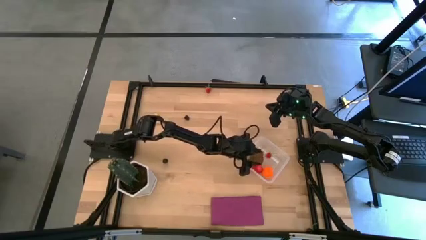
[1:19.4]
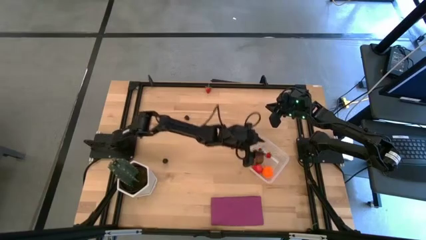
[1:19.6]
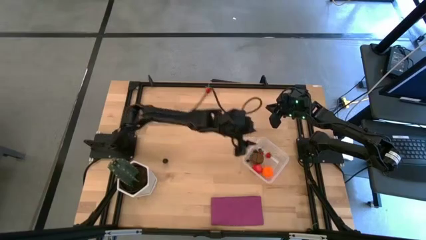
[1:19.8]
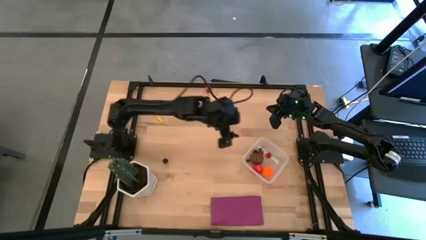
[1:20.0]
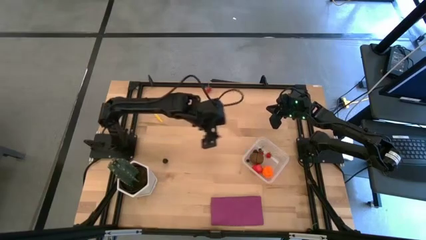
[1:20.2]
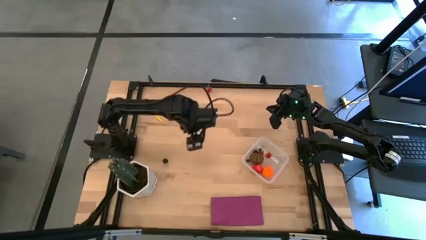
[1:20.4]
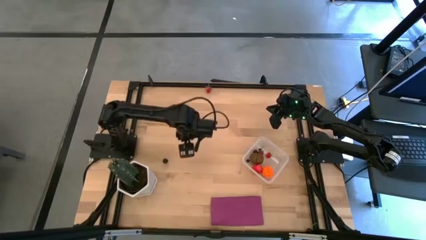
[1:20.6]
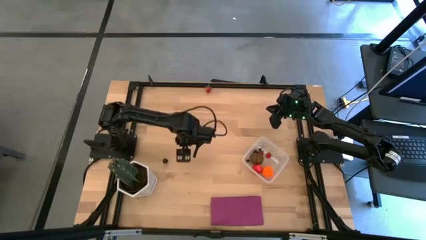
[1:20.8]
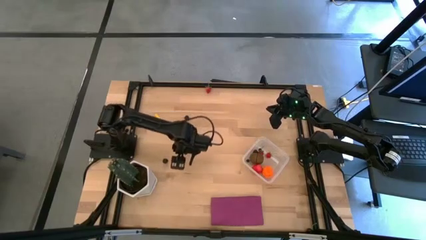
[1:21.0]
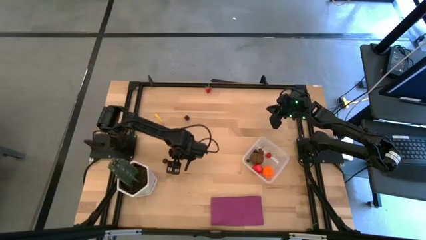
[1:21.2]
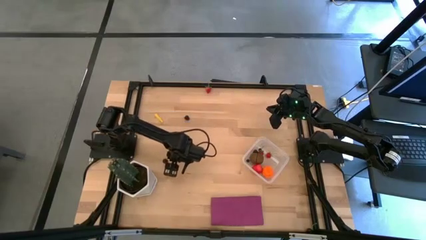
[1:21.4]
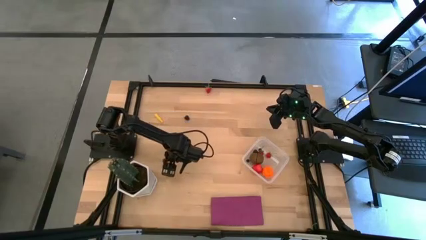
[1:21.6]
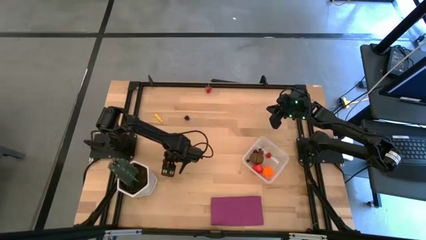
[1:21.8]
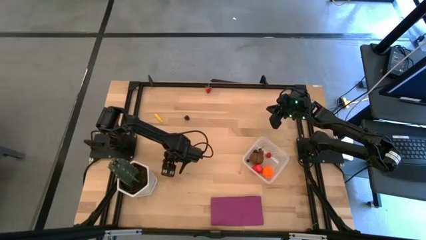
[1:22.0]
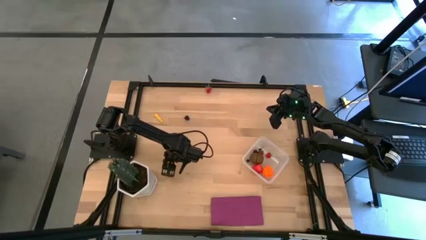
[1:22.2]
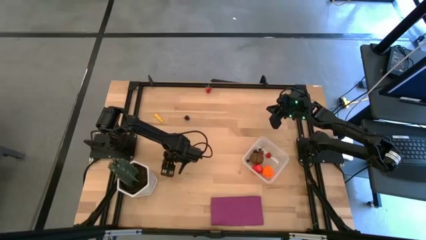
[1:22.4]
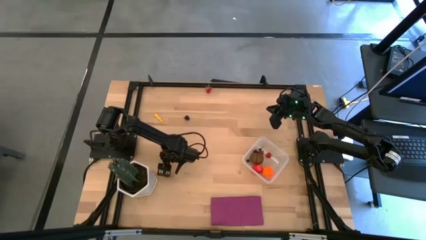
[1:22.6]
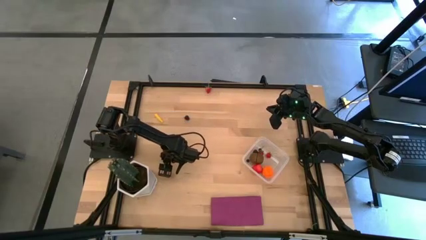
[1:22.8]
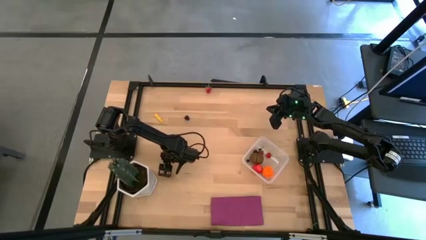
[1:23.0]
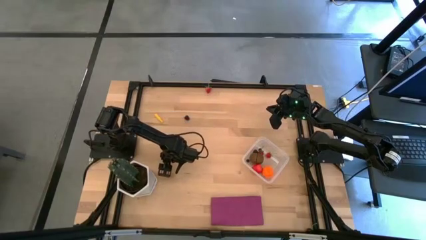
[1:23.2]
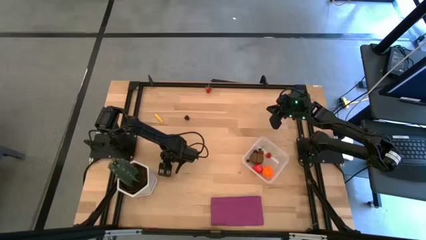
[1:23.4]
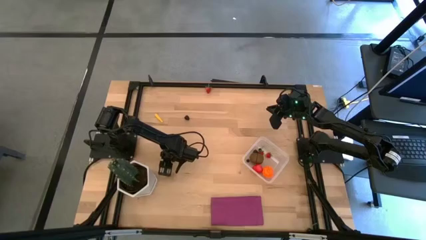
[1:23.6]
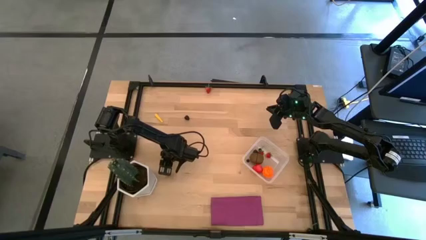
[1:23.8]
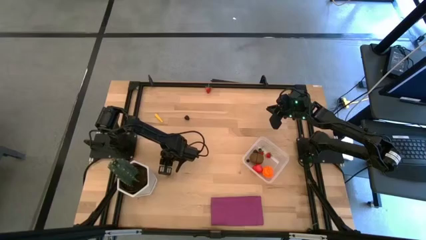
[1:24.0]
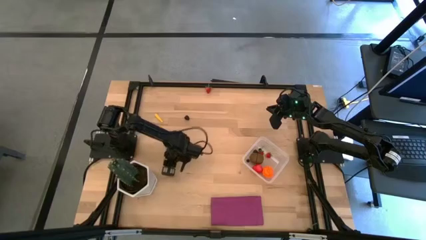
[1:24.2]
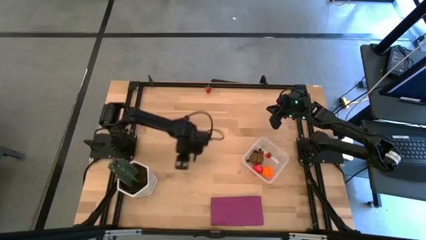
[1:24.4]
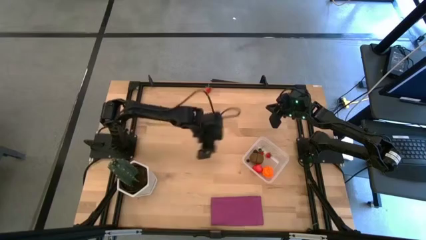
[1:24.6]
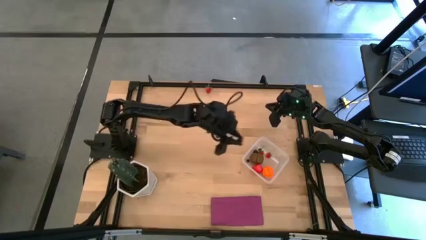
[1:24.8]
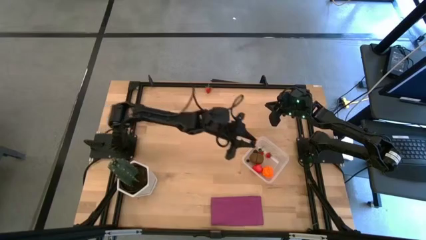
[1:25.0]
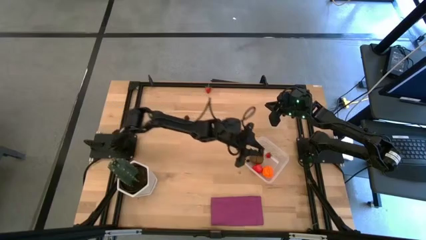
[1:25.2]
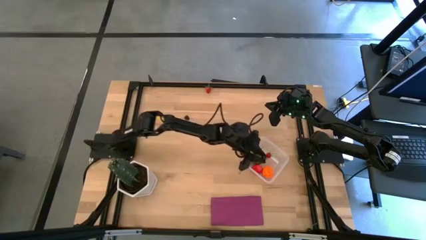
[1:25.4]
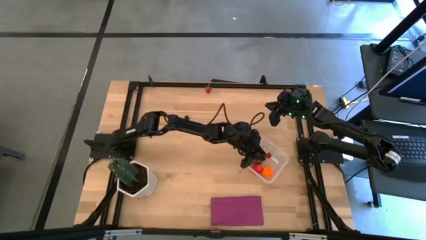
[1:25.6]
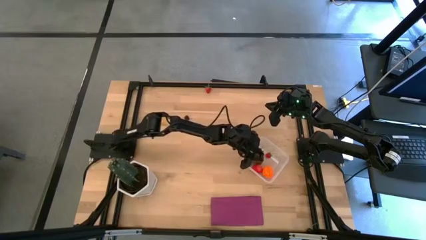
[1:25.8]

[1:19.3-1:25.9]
Task: Pick and placing Produce into tupperware
Put the blueberry into the transparent bin

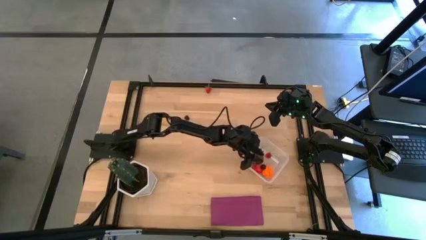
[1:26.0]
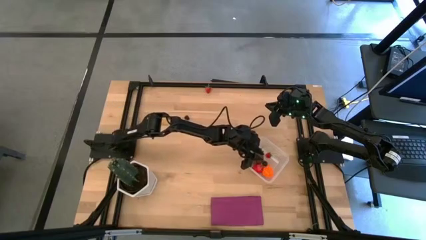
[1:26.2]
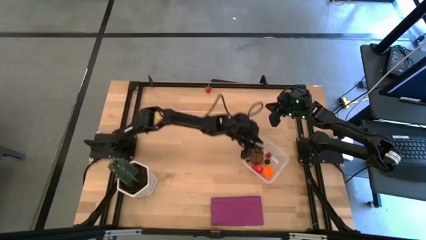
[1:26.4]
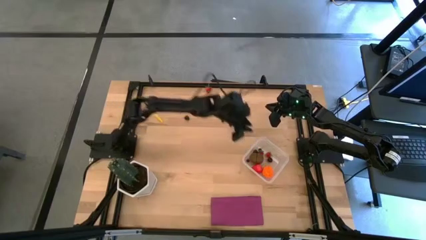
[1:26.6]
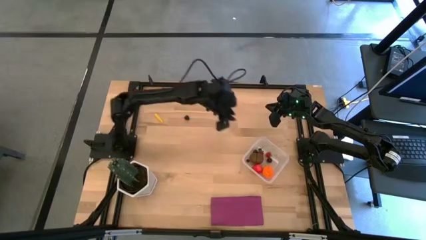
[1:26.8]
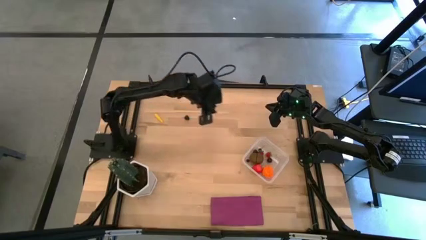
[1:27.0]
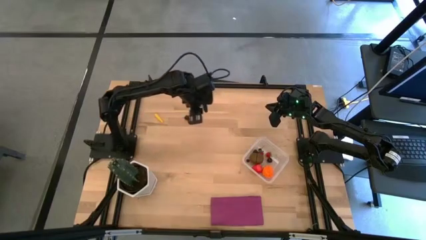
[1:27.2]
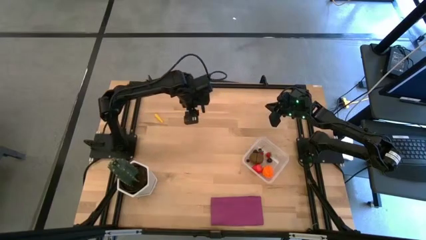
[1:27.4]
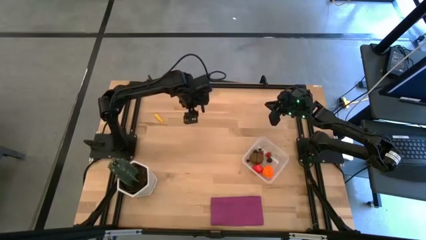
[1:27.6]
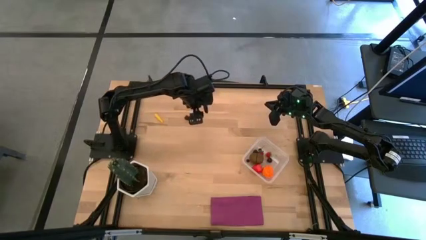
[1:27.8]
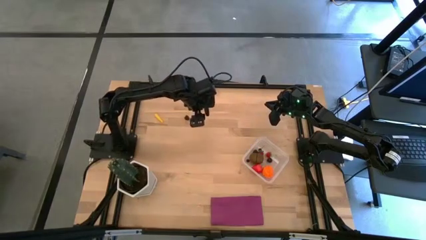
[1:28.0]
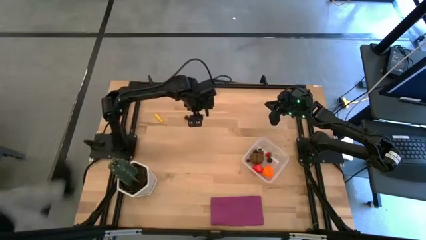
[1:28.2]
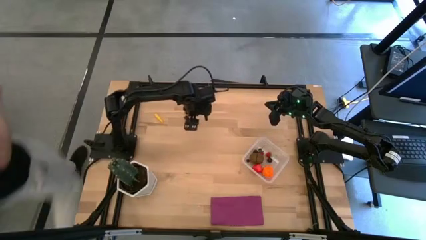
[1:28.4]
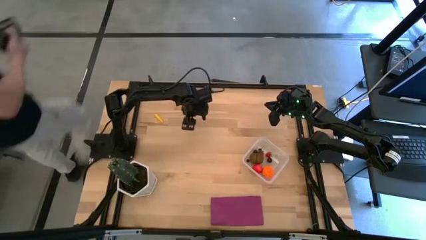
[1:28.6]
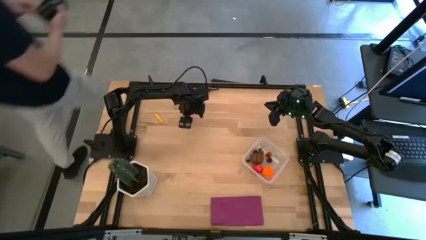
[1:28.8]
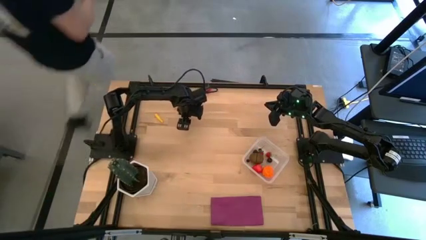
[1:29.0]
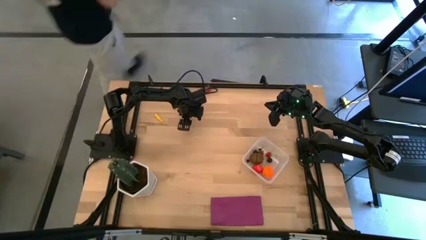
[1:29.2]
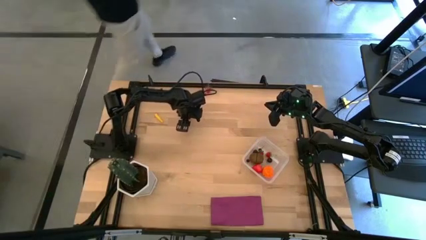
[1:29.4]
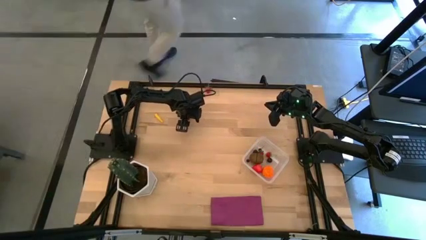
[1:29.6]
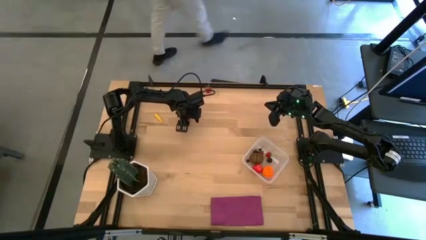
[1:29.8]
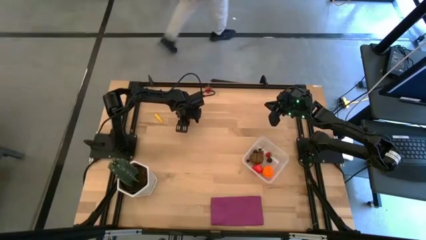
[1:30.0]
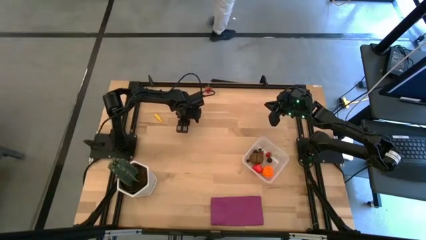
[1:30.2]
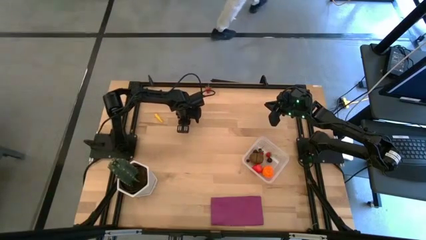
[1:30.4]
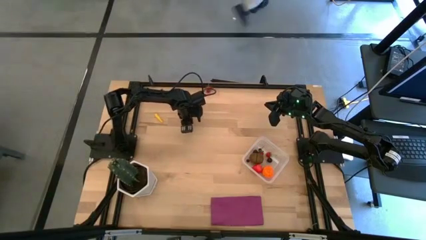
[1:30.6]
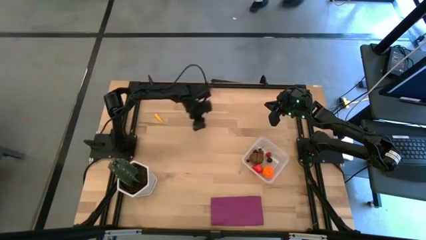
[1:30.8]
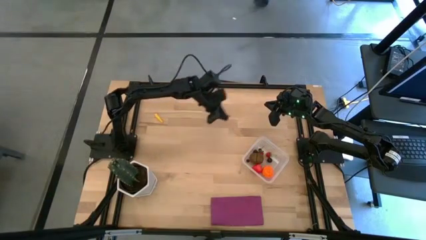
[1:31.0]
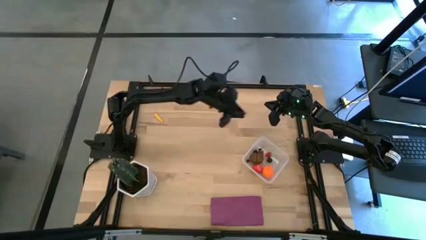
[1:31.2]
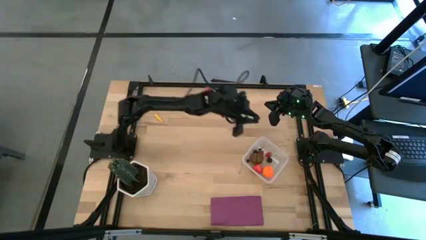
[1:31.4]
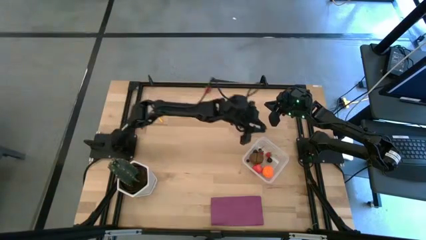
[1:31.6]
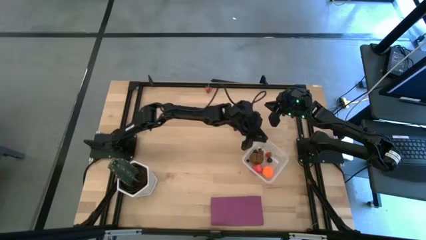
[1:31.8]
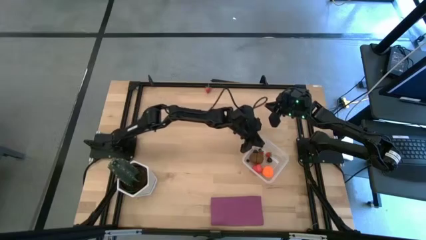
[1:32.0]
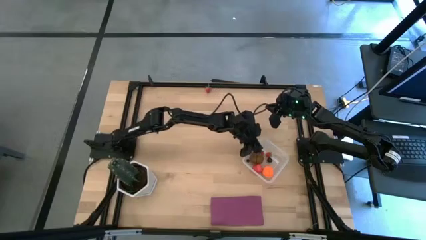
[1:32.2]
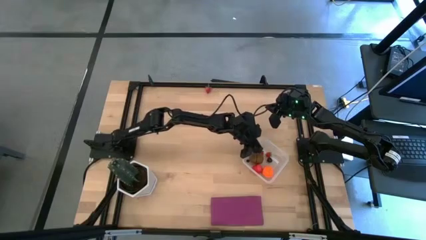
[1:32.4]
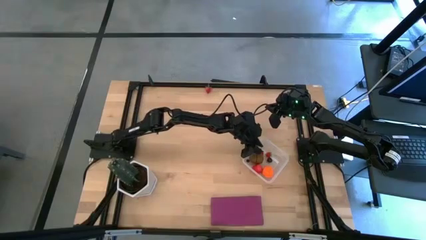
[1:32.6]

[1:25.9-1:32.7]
Put the blackberry into the transparent bin
